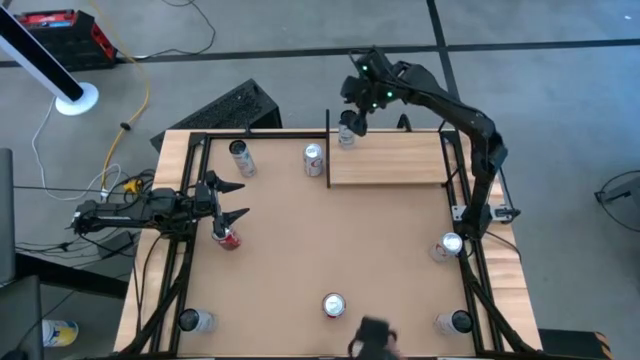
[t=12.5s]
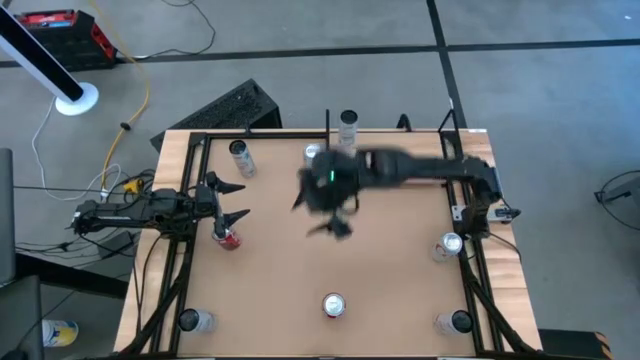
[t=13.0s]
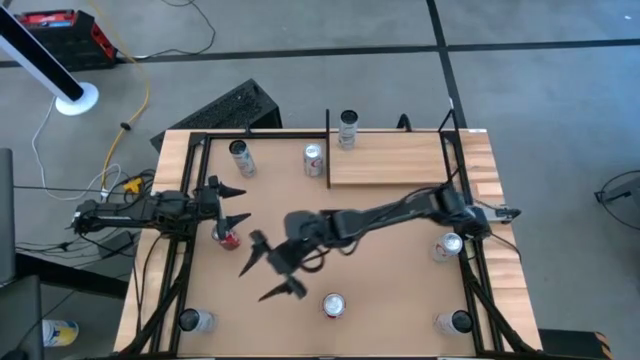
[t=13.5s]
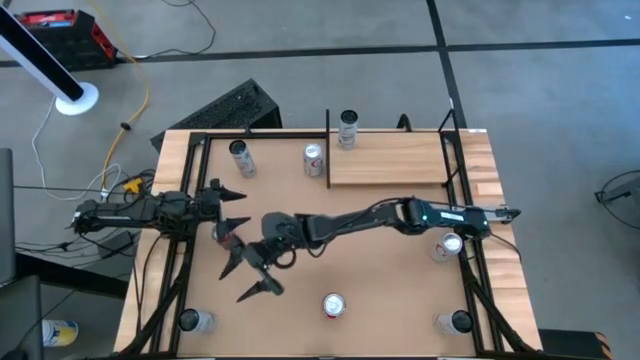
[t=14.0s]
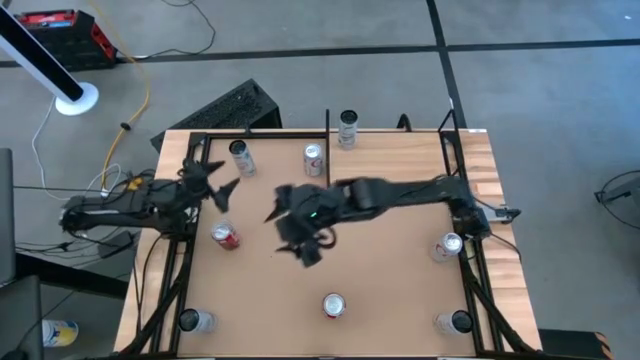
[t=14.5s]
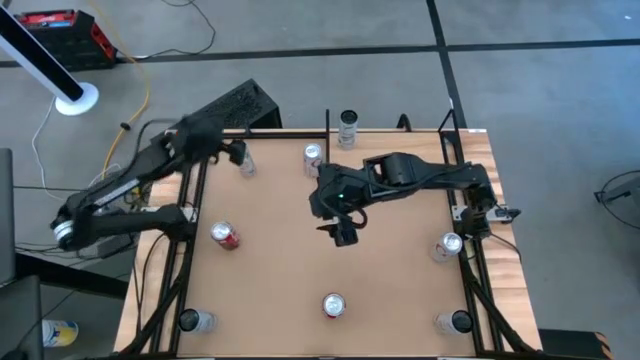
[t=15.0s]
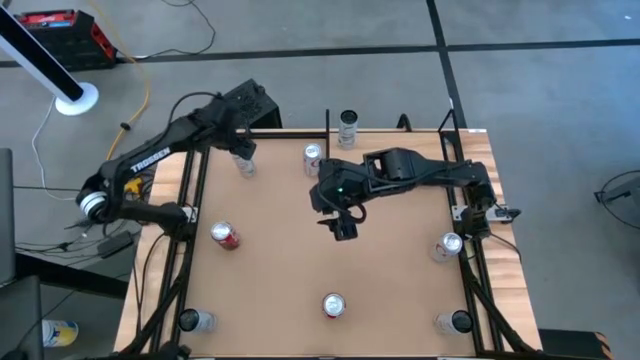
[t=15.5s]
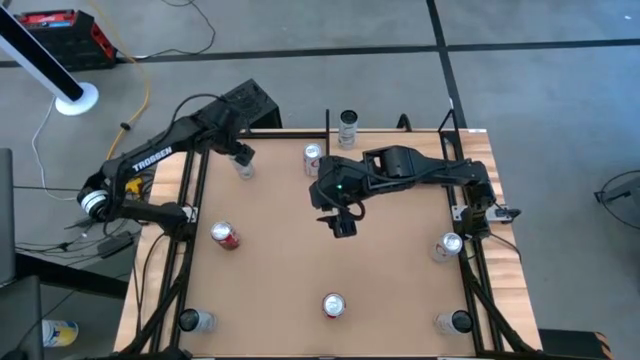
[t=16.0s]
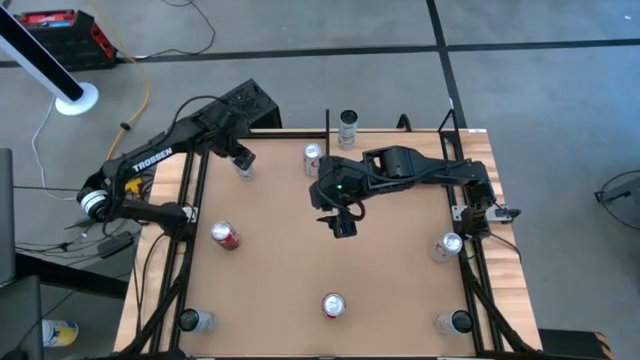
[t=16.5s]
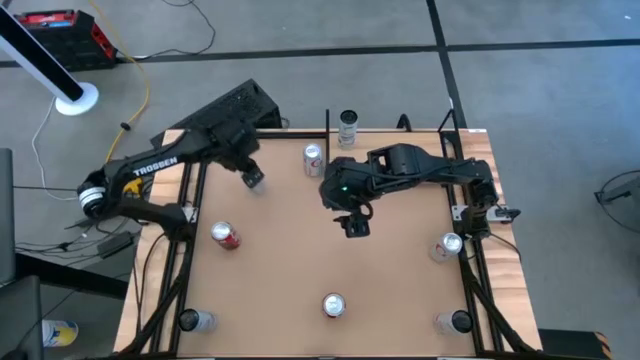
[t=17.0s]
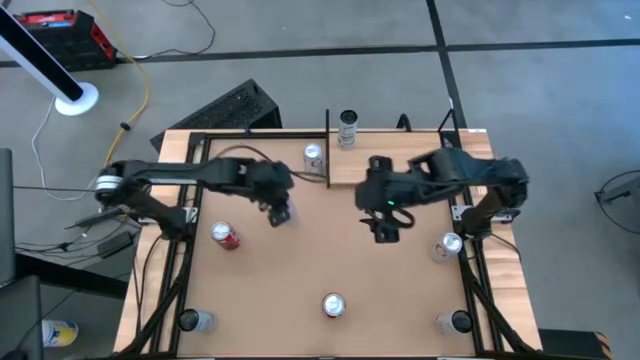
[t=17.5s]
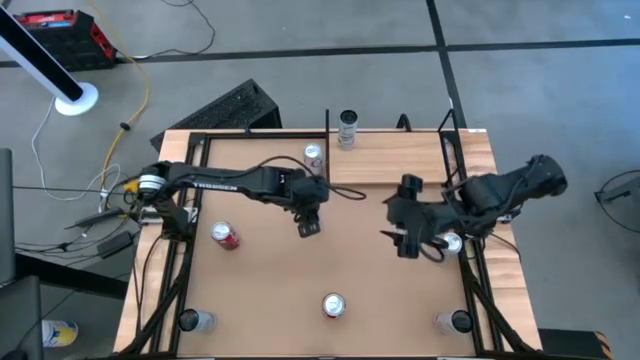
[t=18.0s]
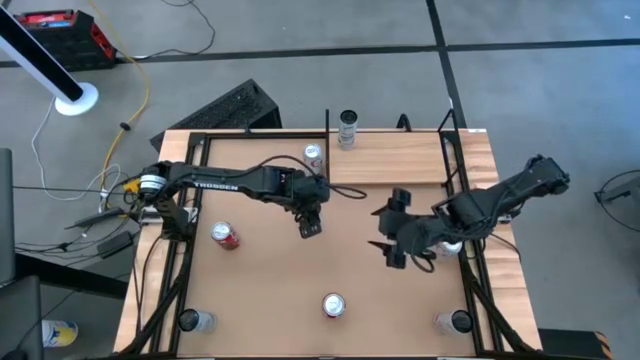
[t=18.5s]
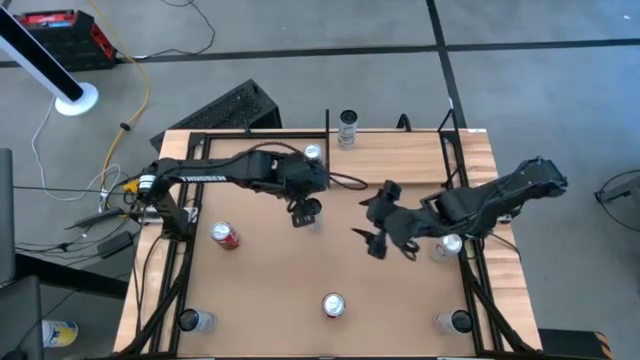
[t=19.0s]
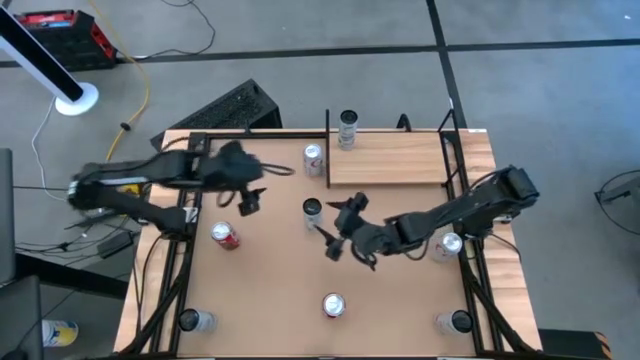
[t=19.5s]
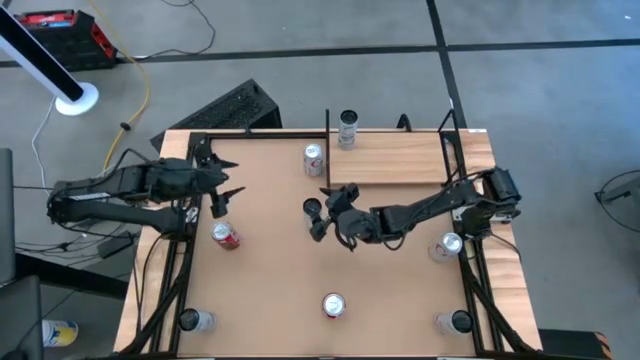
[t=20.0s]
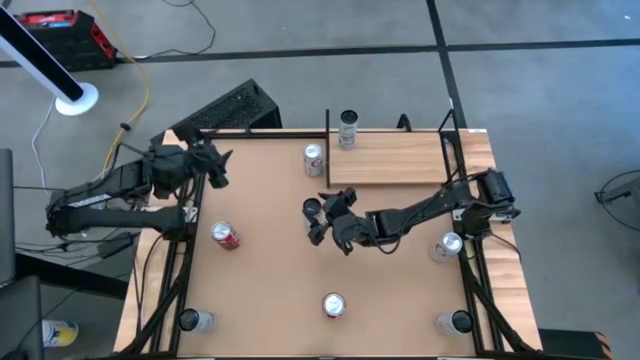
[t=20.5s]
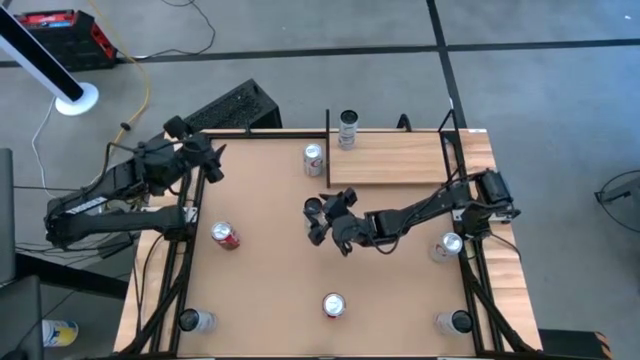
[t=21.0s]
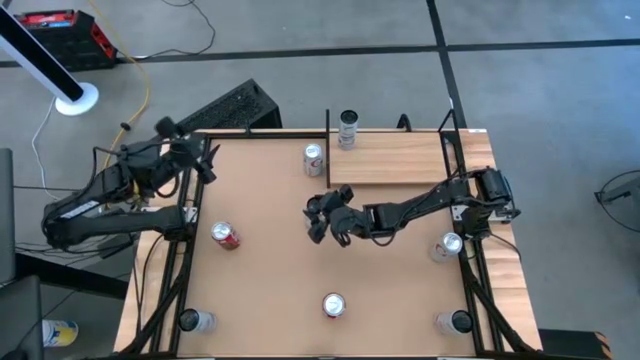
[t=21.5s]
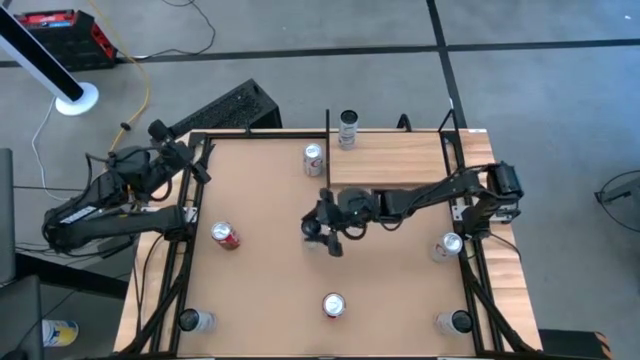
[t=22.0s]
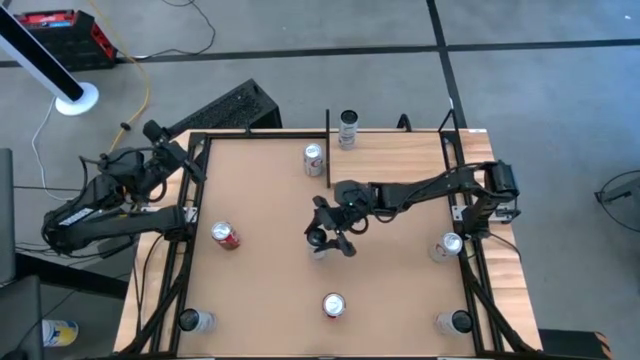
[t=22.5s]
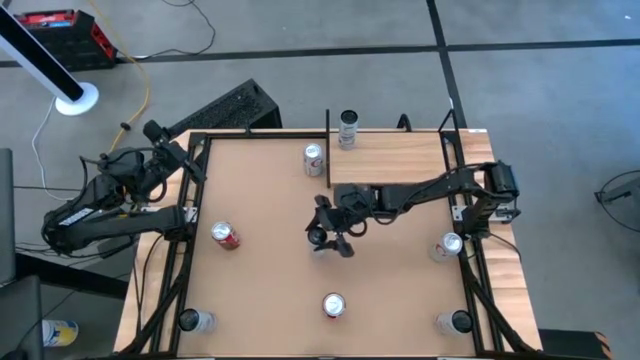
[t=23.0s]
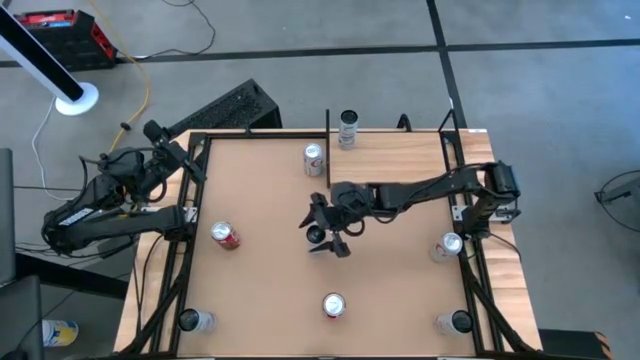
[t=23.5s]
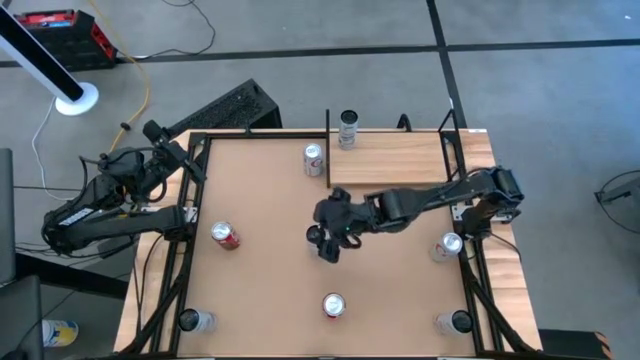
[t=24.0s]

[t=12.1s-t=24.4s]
Task: Place canned beverage on shelf
Put the top white-pink soda can on the shelf

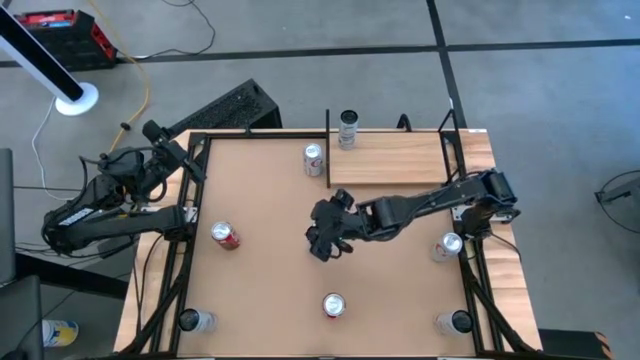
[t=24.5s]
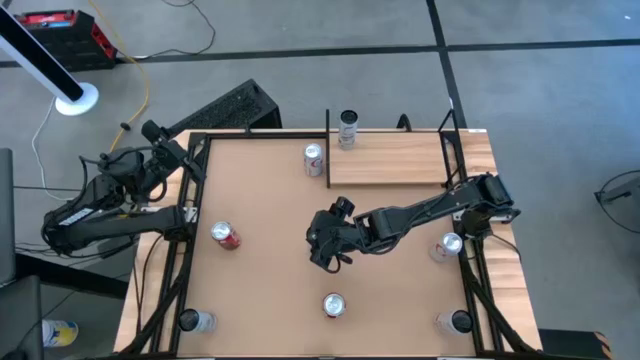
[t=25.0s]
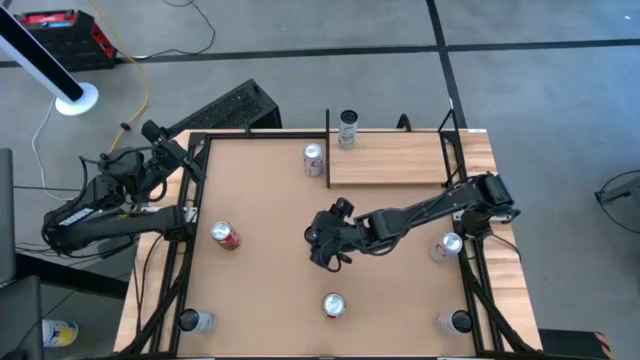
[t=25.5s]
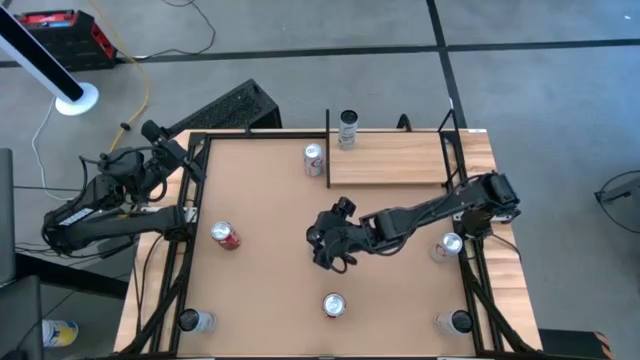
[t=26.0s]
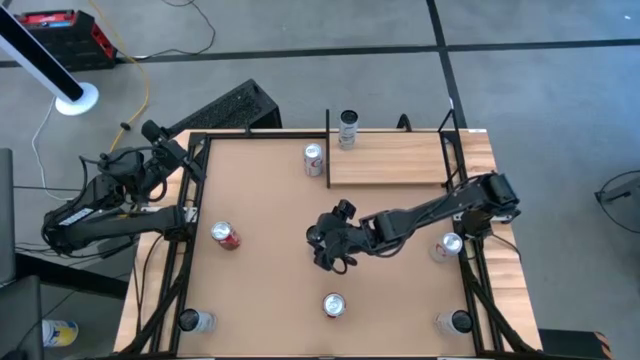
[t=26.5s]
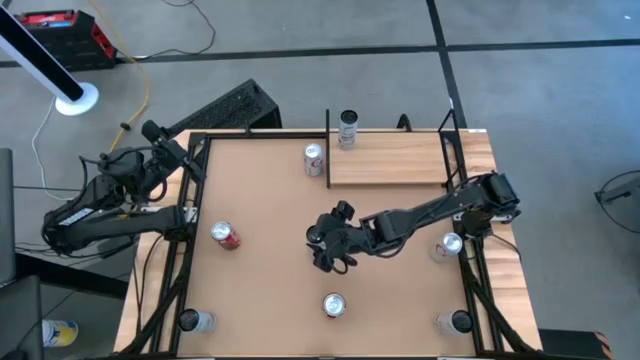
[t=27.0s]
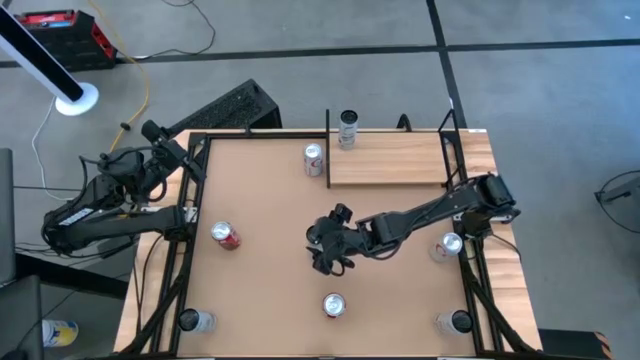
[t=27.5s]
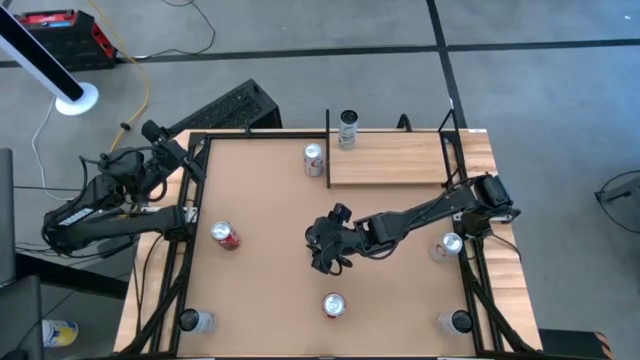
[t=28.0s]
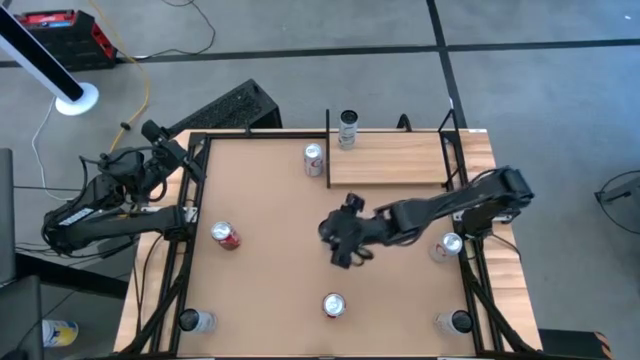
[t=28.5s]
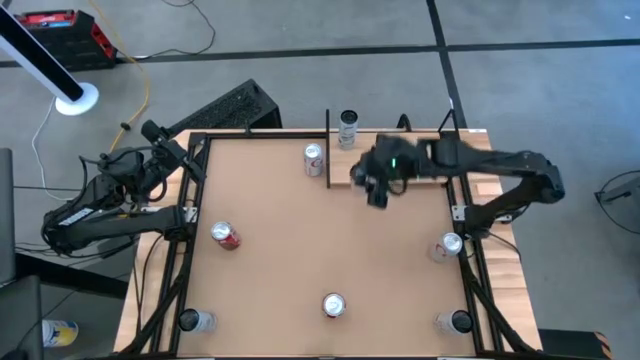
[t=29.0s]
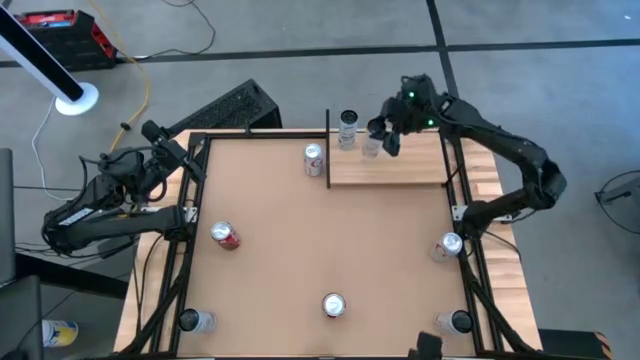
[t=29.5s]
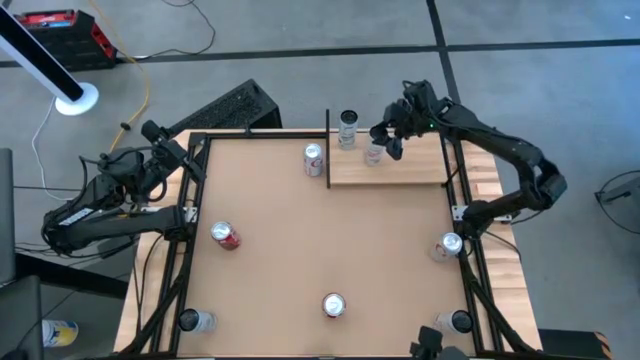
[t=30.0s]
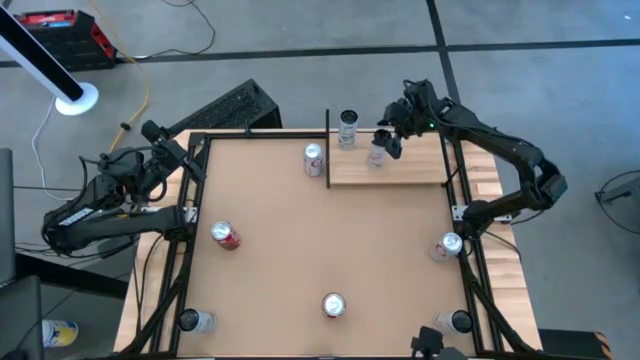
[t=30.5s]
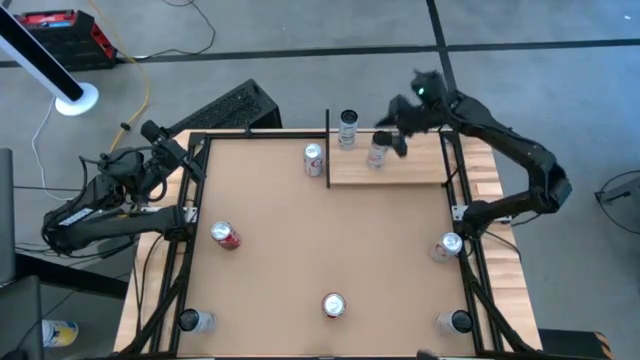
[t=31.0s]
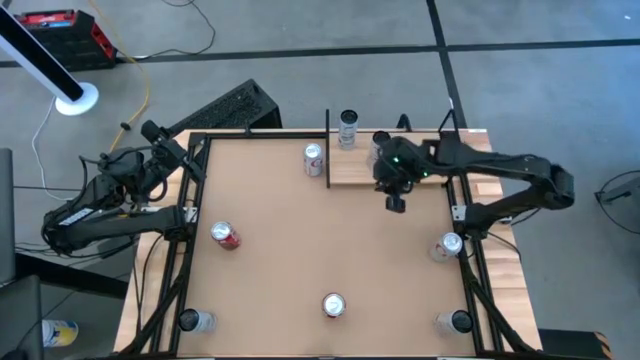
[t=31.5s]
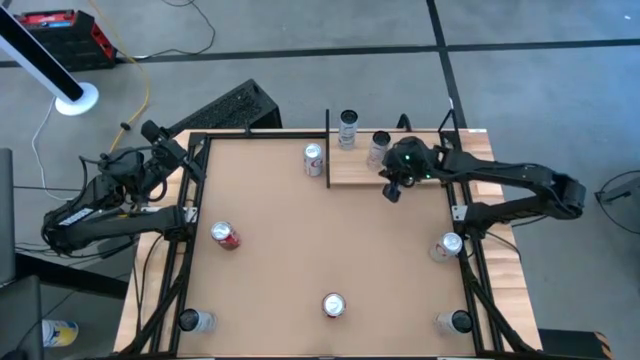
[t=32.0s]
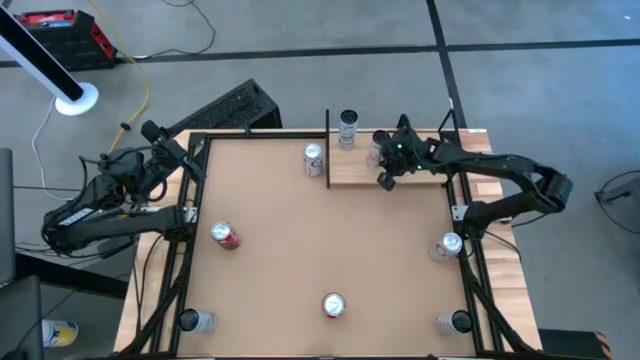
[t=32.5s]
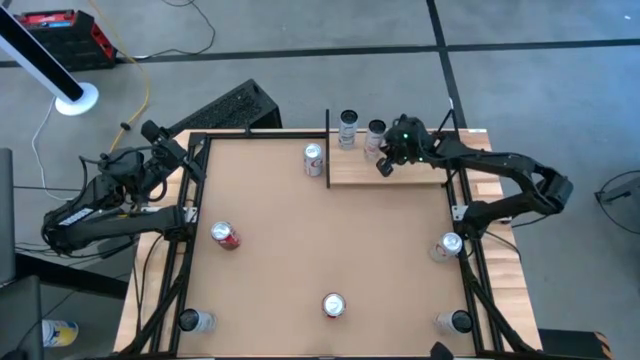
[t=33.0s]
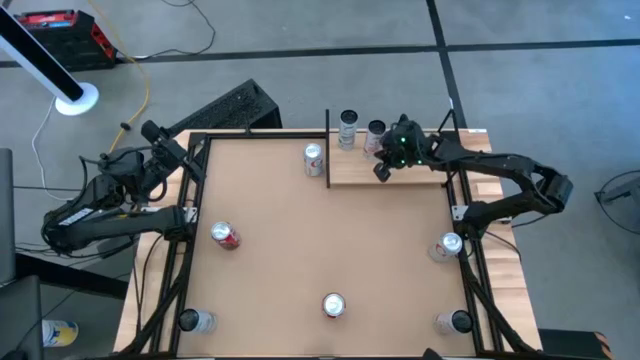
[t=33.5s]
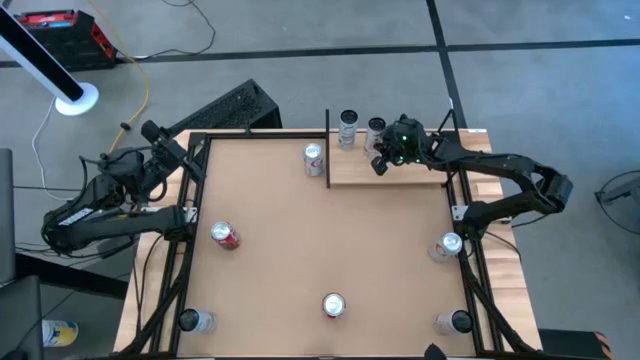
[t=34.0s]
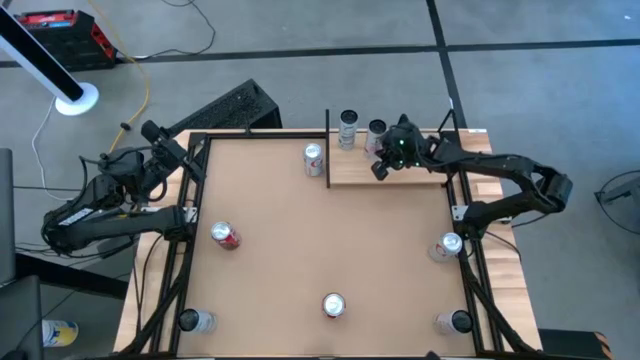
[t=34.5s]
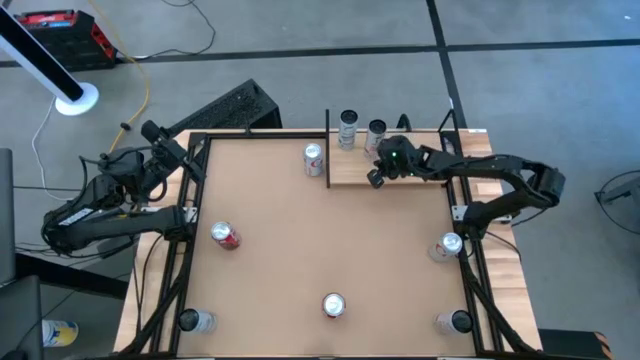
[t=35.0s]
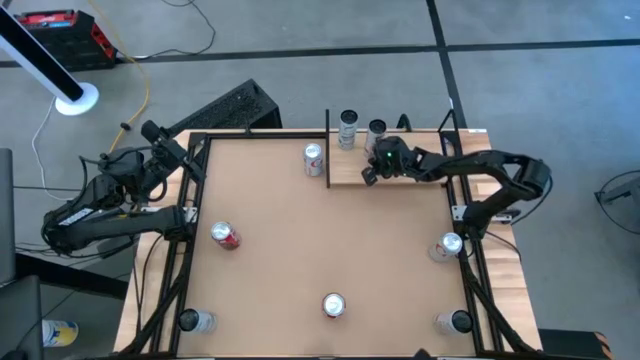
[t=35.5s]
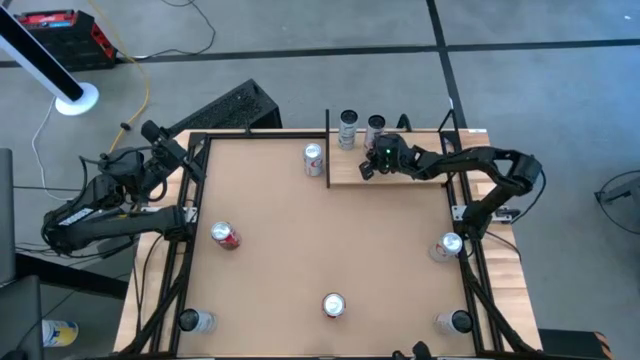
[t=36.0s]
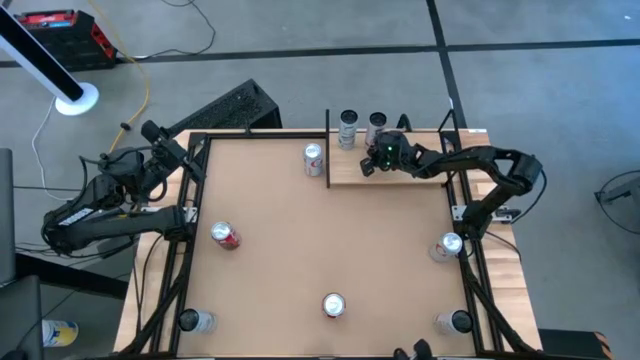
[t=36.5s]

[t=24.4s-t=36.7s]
Put the top white-pink soda can on the shelf
